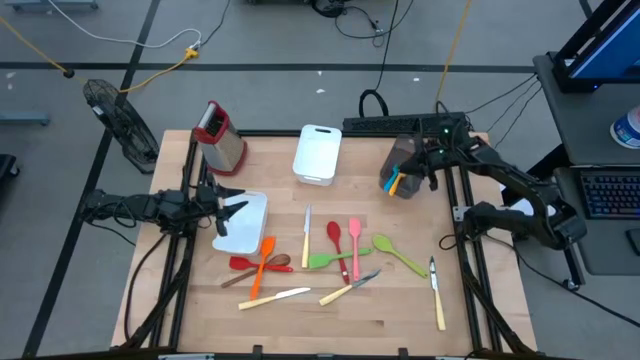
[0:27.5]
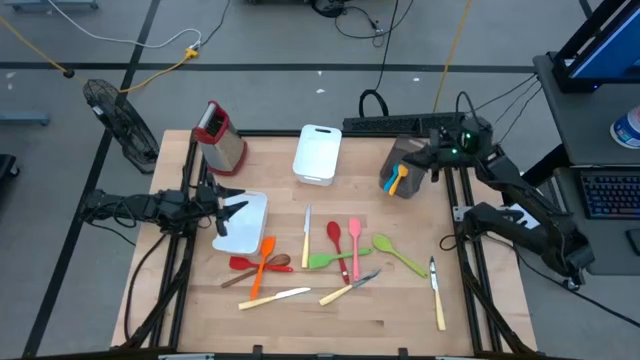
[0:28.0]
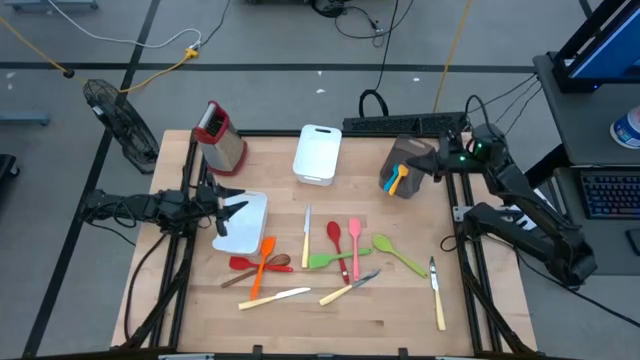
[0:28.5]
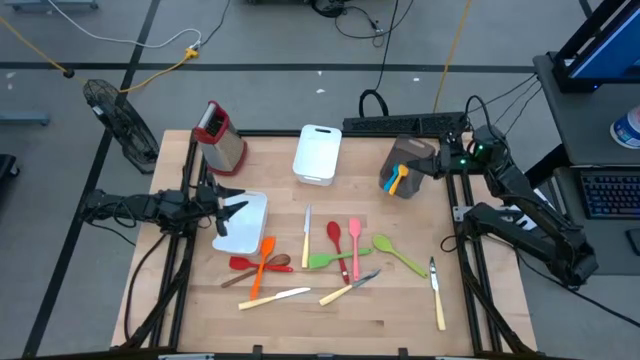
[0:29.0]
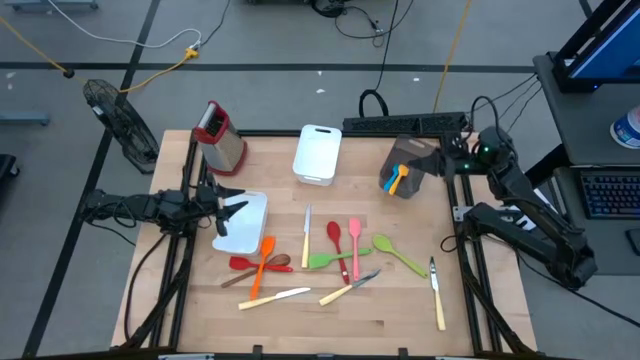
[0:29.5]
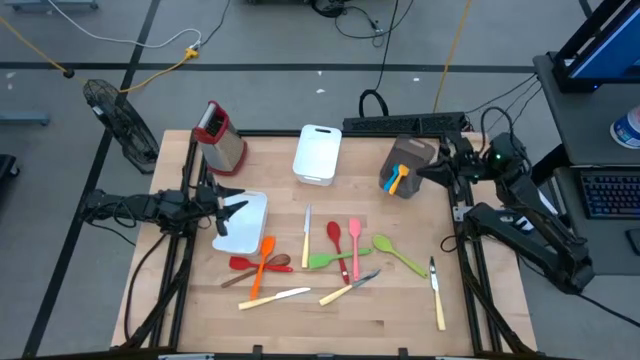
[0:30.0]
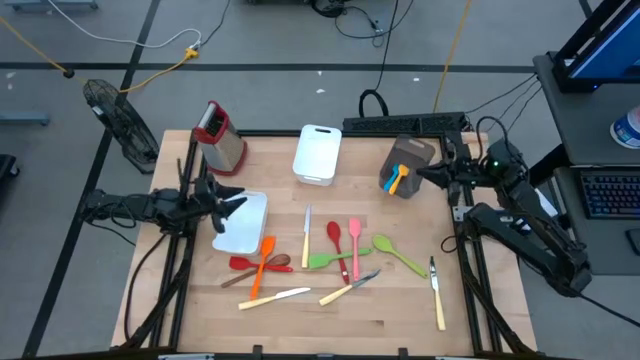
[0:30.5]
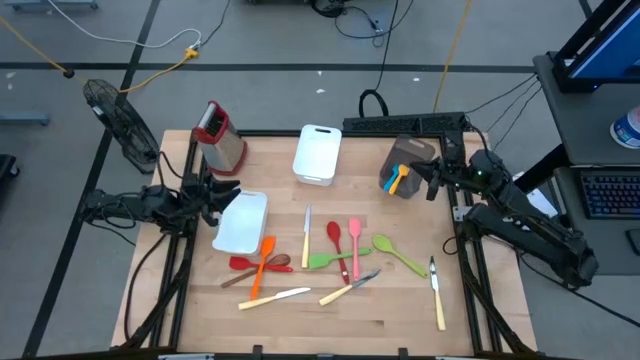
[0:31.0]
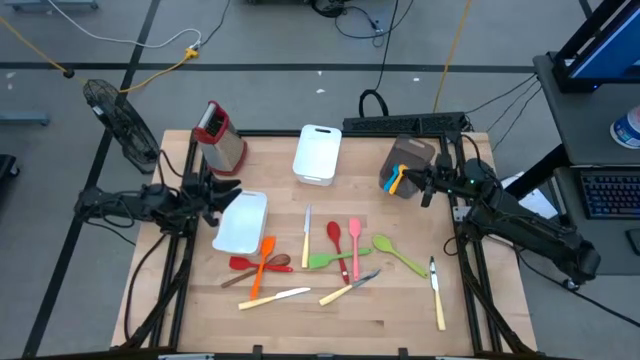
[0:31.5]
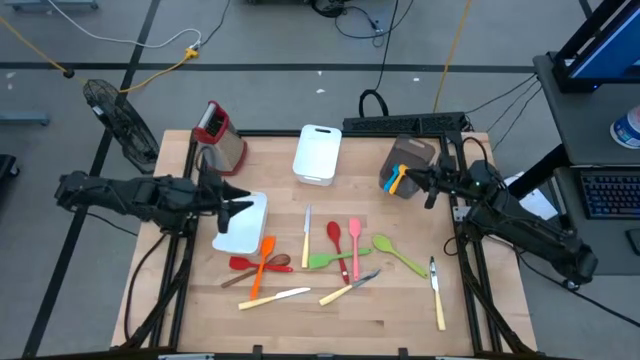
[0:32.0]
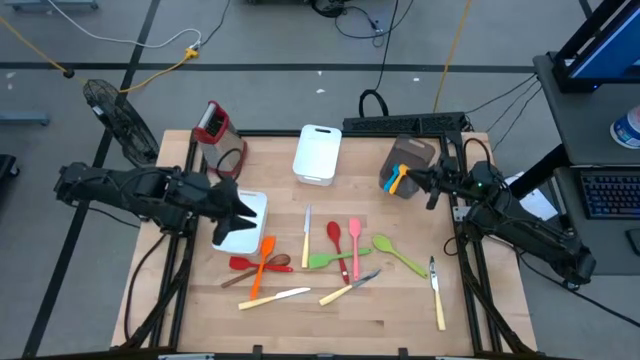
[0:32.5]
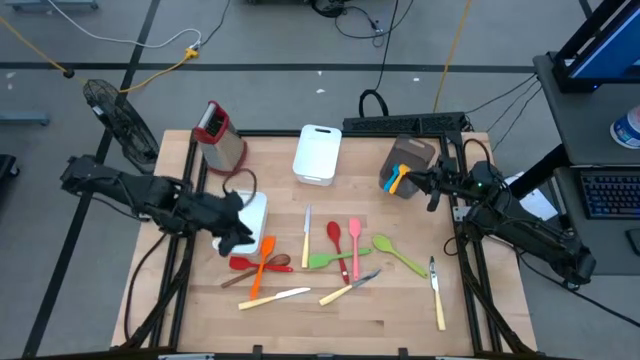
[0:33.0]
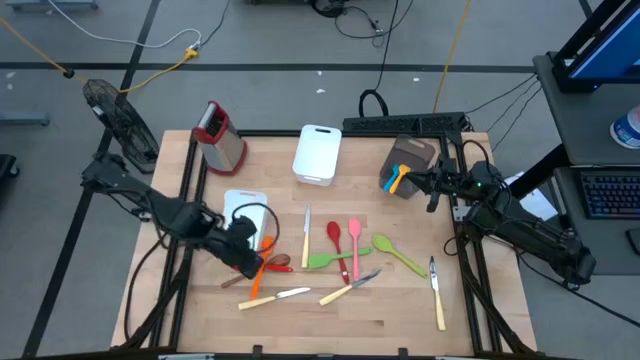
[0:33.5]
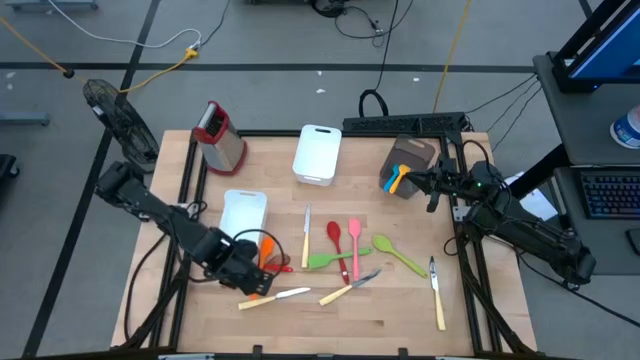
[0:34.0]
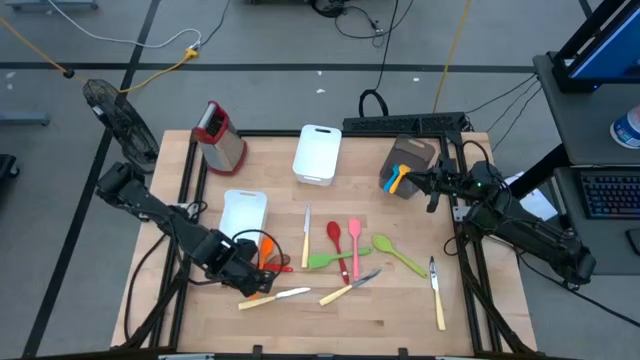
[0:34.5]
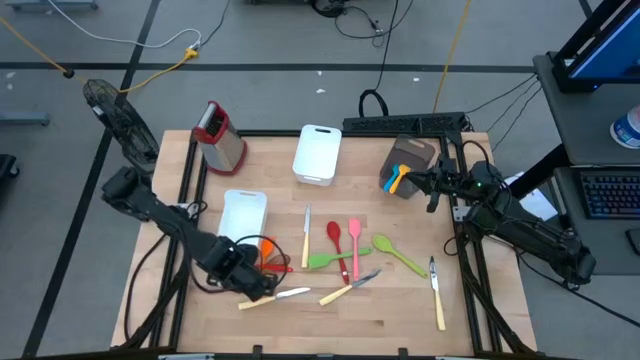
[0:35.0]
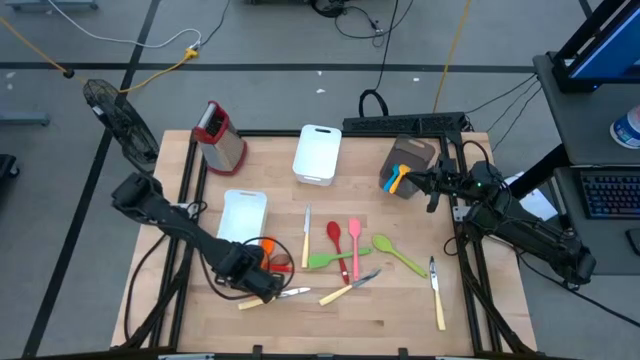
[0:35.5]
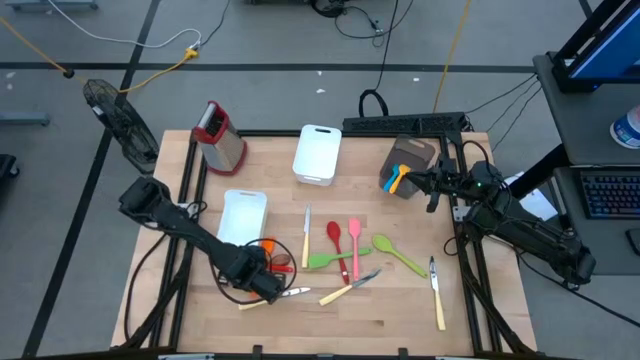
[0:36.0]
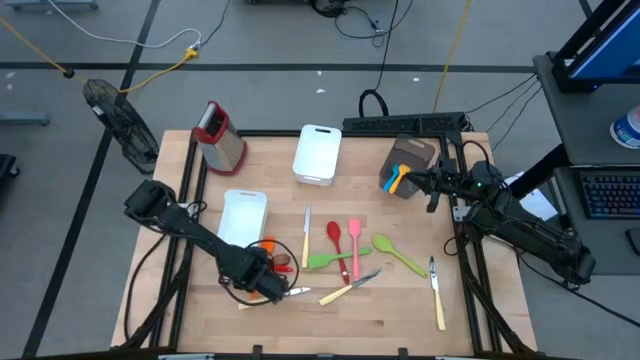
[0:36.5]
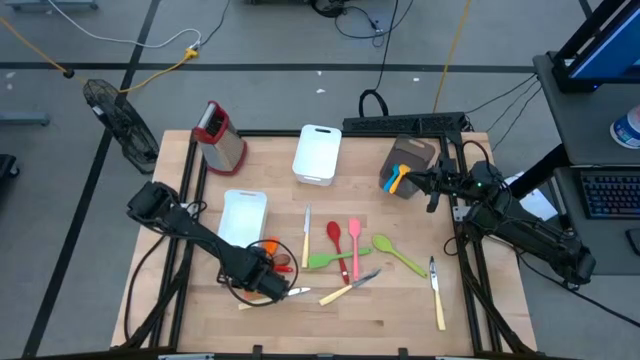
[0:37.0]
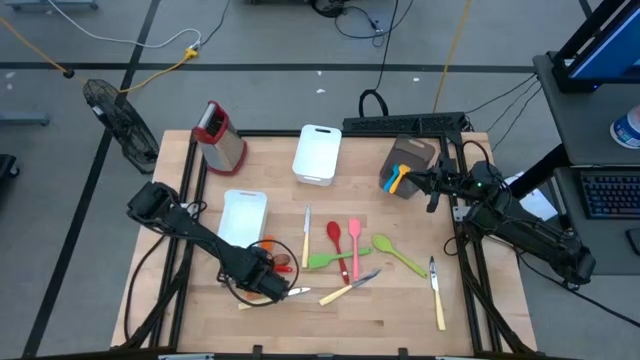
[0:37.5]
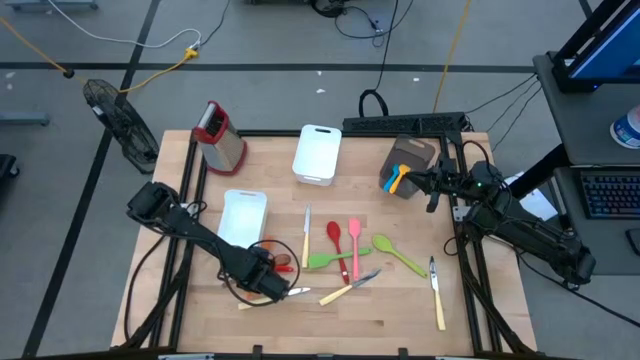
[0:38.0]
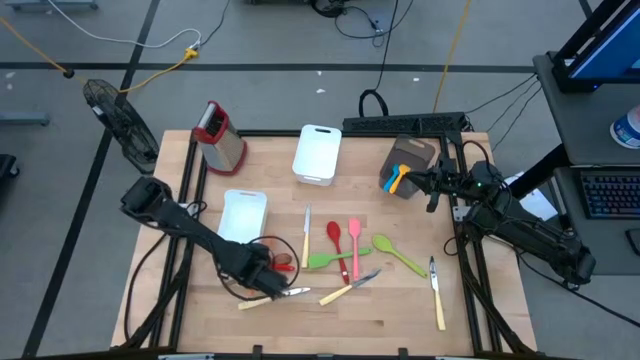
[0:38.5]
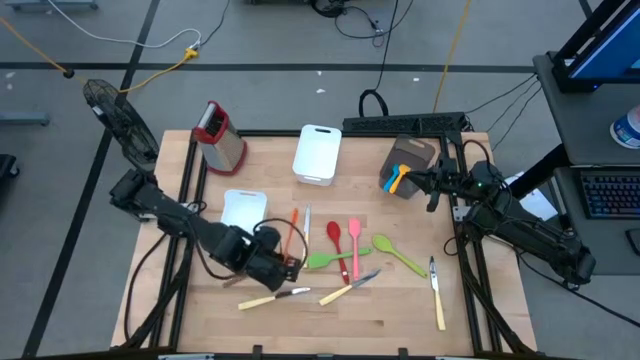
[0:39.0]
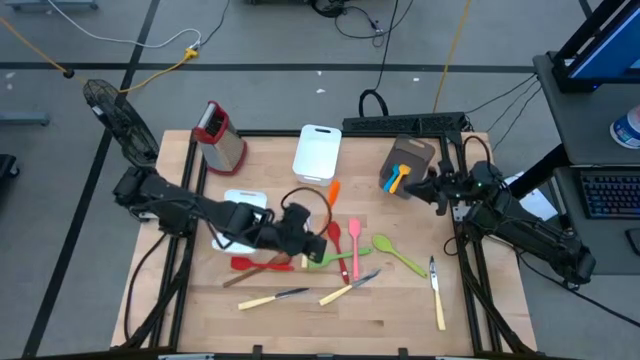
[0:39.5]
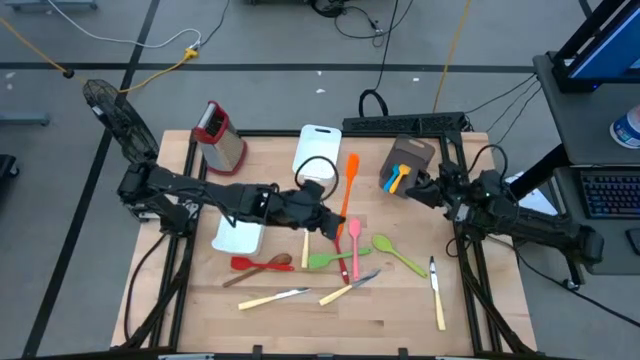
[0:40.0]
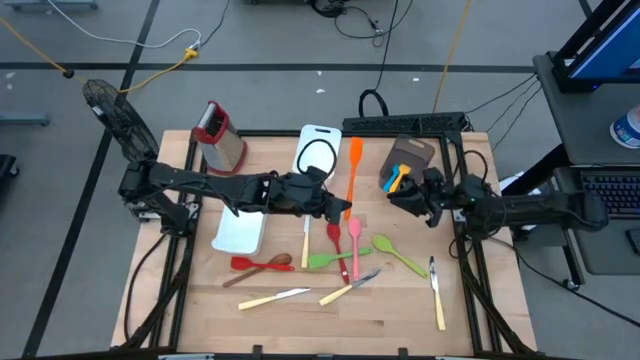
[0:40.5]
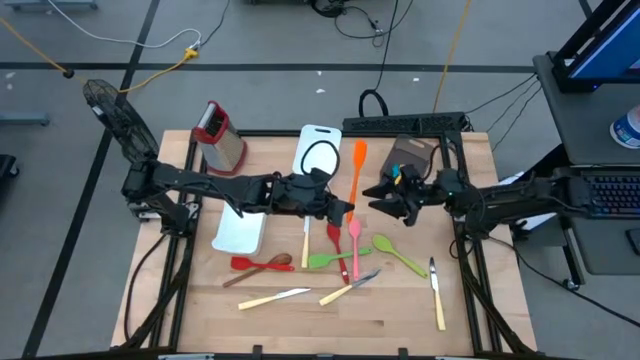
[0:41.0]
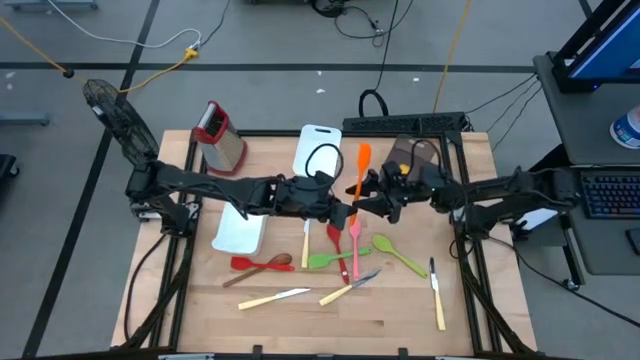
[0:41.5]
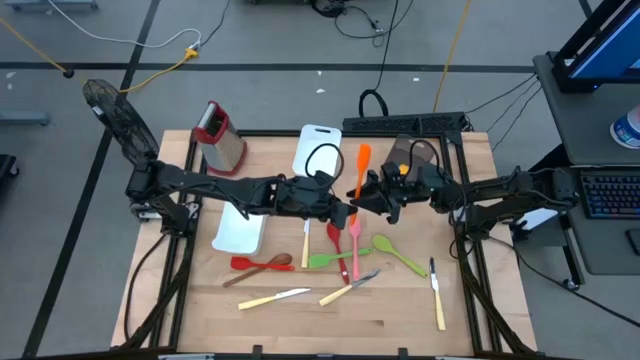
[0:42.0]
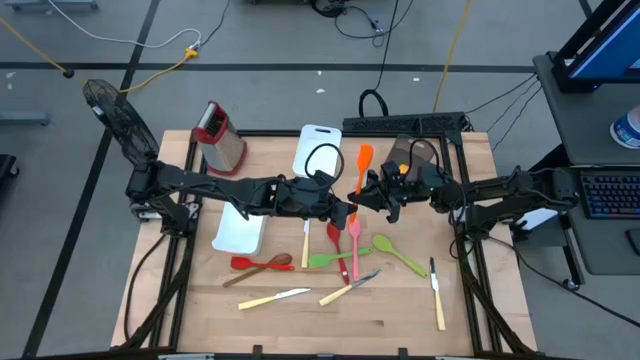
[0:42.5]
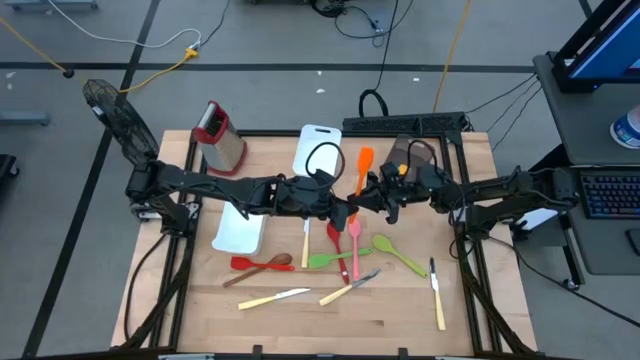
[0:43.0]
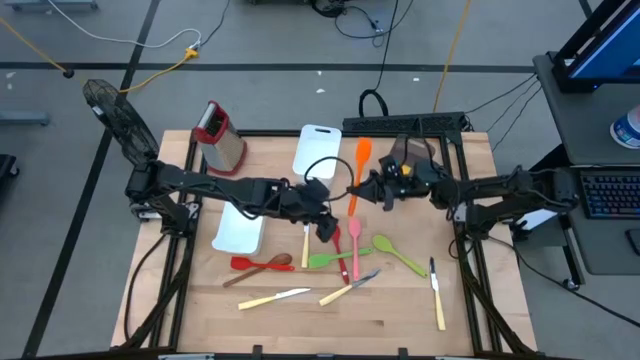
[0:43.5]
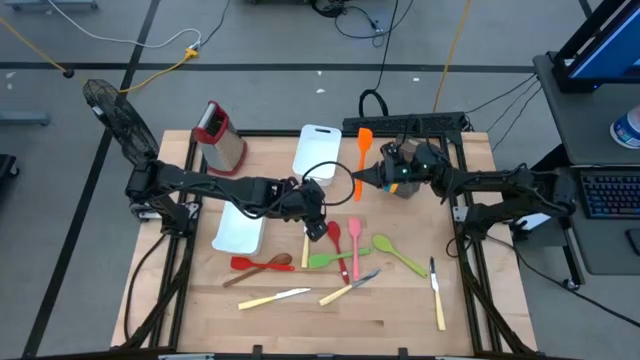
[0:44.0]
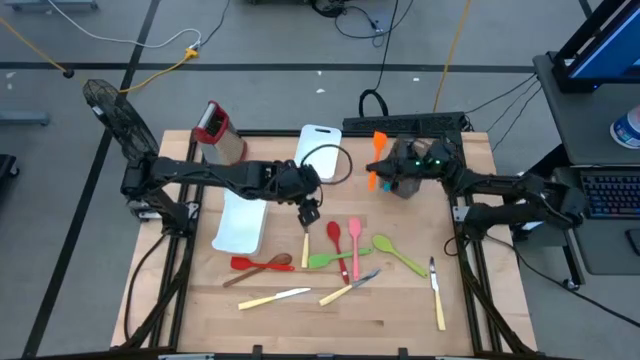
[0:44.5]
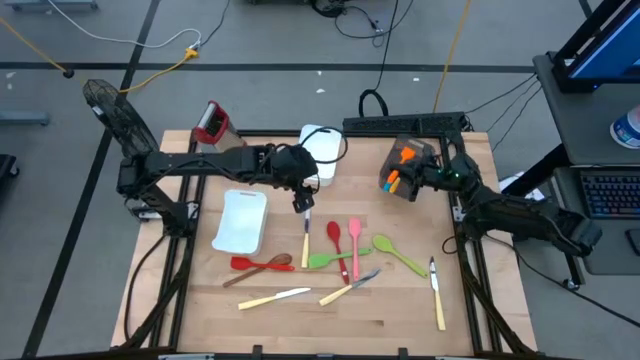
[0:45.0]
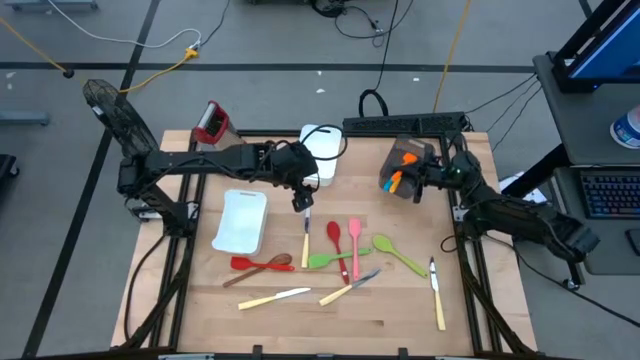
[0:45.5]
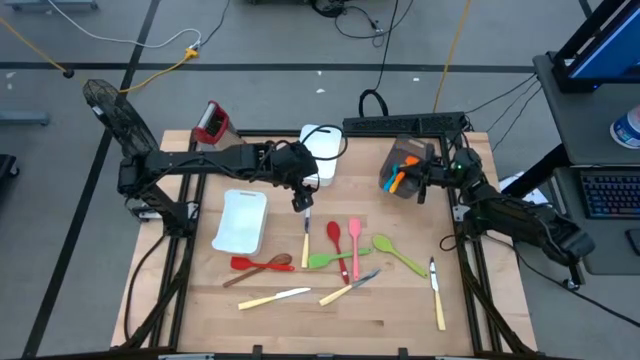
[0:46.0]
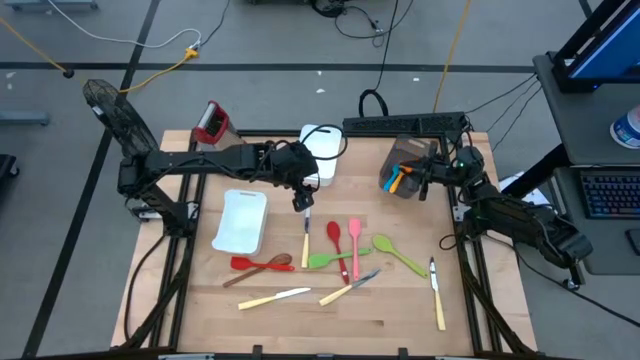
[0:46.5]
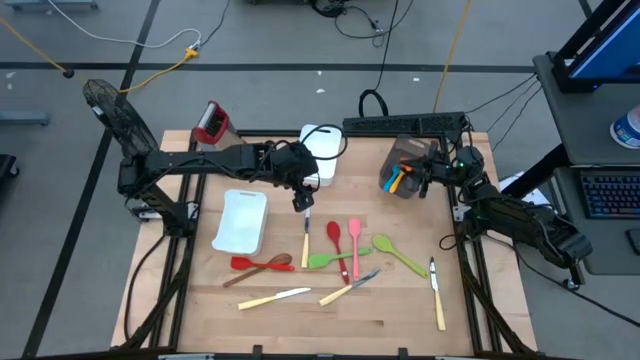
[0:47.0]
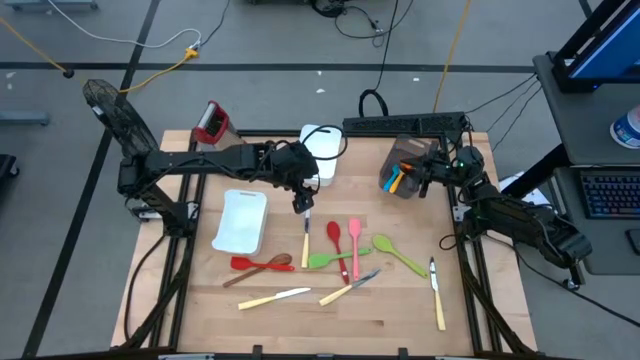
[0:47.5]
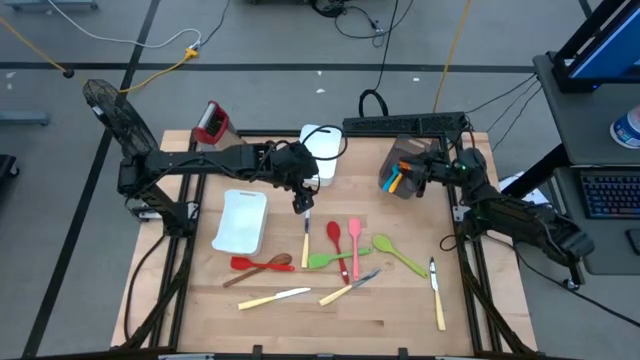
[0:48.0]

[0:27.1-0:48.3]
Task: Pick & Place Kitchen Items
Put the orange spatula into the black bin

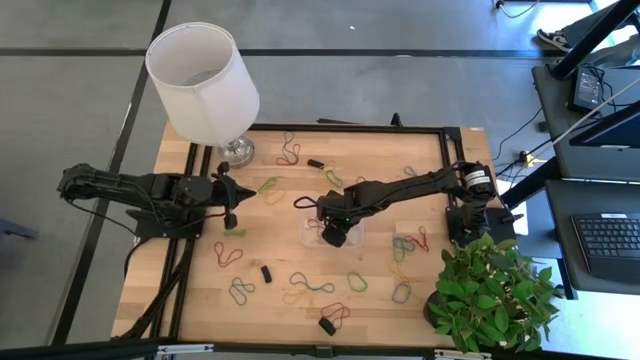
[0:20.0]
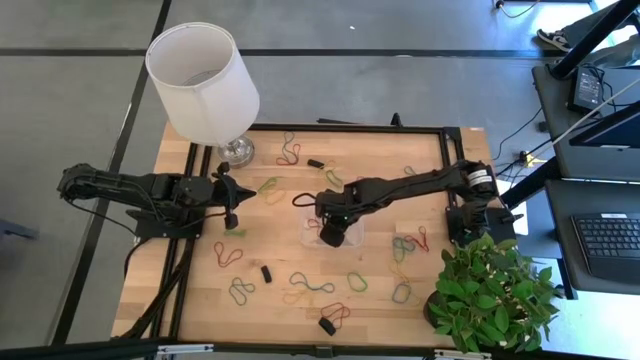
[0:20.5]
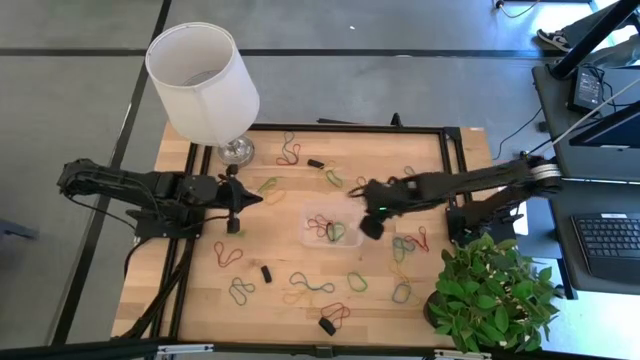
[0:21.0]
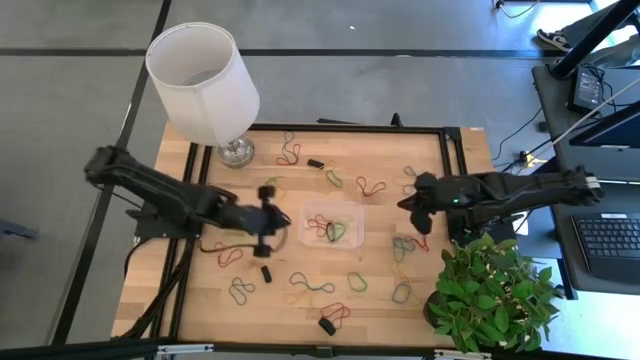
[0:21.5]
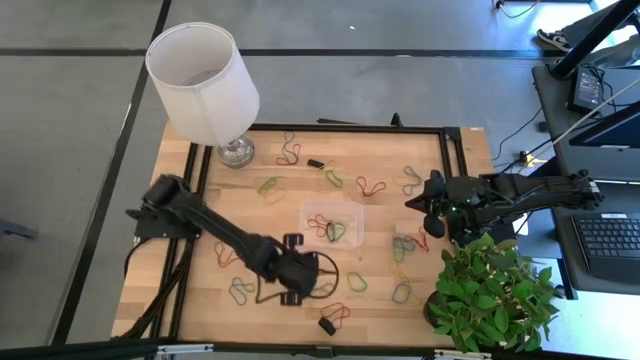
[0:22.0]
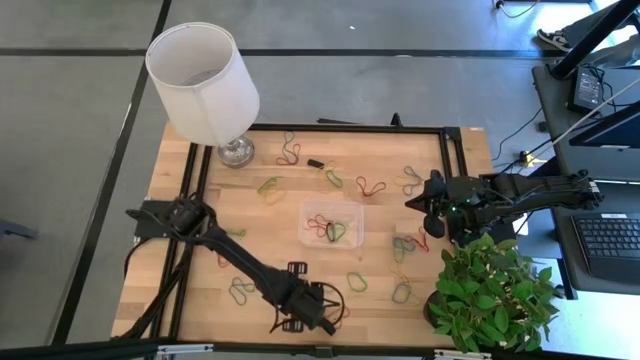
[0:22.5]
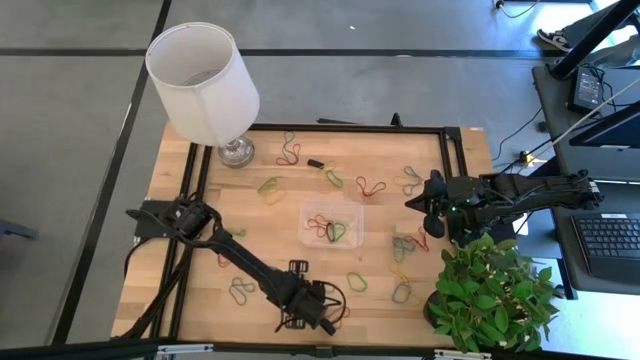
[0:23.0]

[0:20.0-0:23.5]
Task: Pick and place rubber bands into bin
Put the yellow rubber band into the transparent bin
